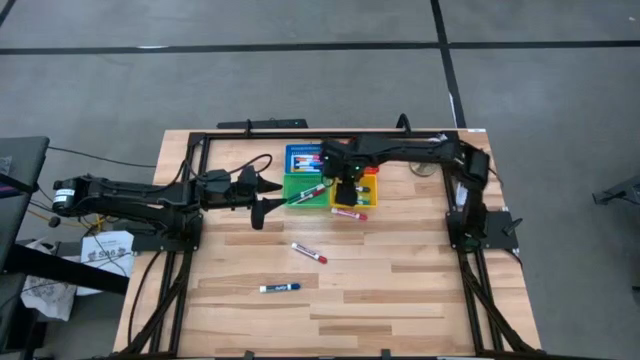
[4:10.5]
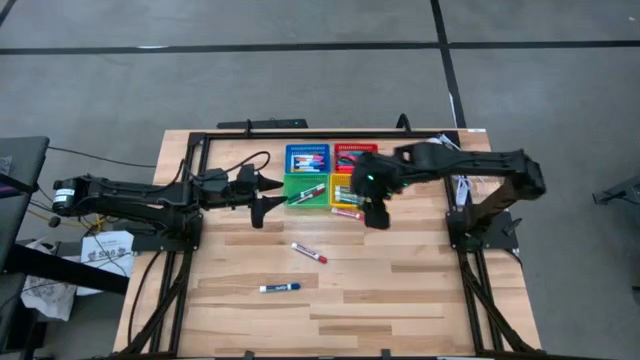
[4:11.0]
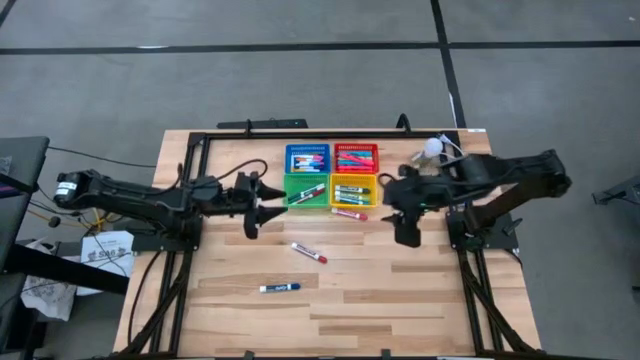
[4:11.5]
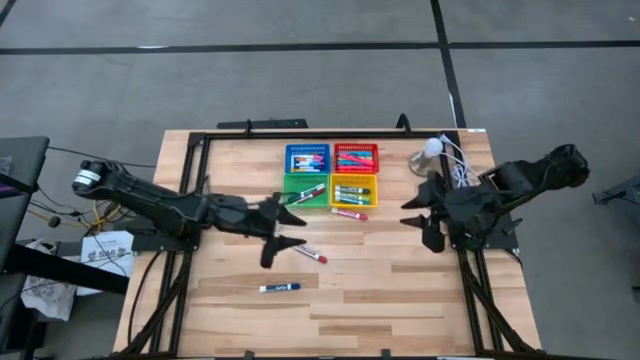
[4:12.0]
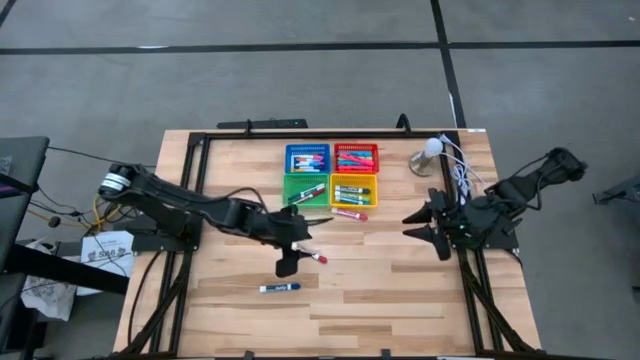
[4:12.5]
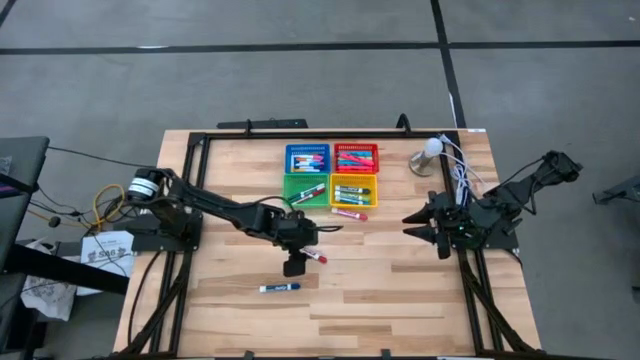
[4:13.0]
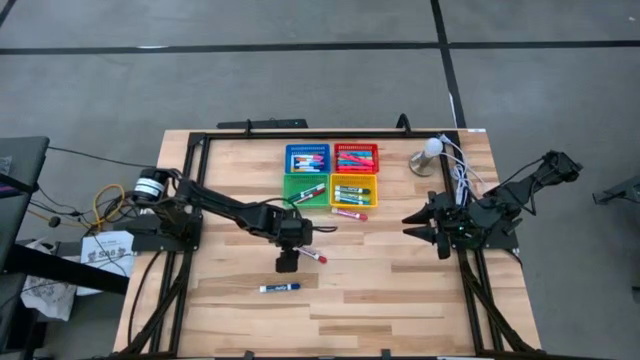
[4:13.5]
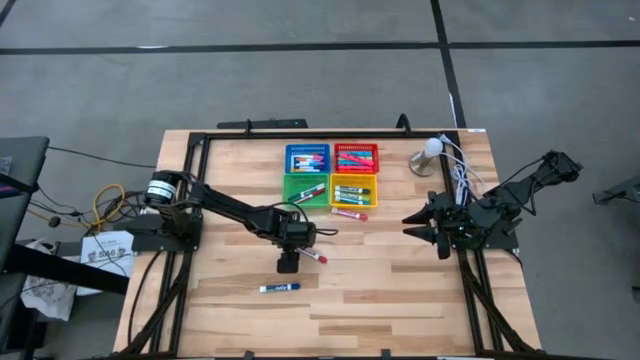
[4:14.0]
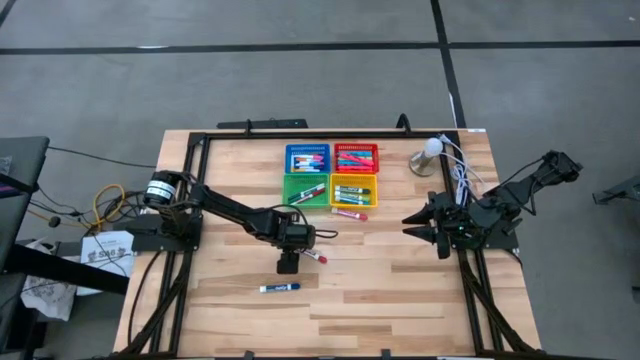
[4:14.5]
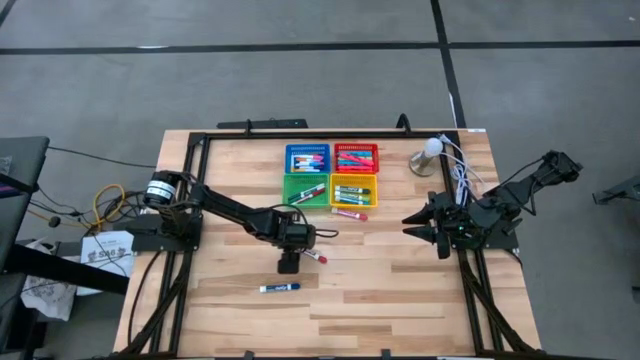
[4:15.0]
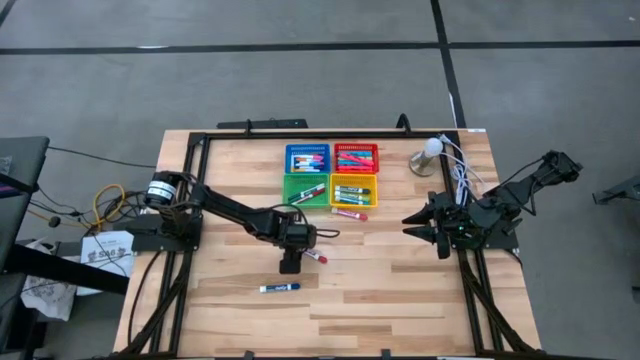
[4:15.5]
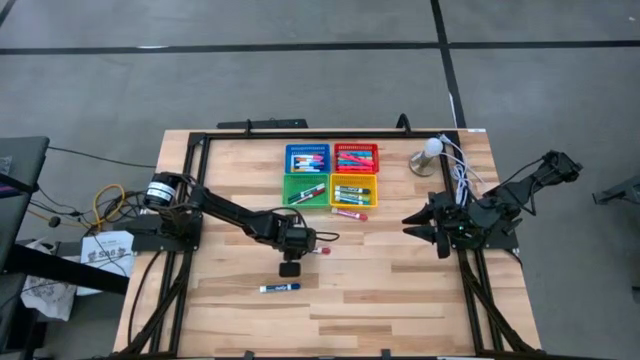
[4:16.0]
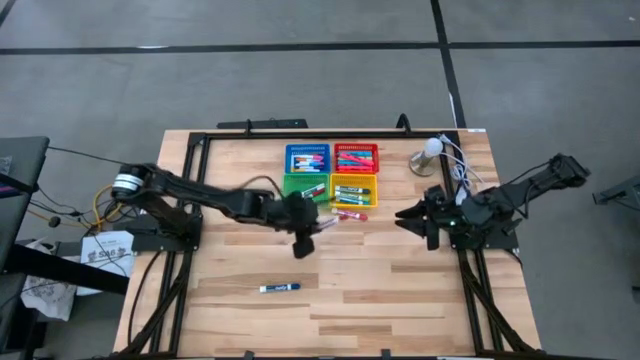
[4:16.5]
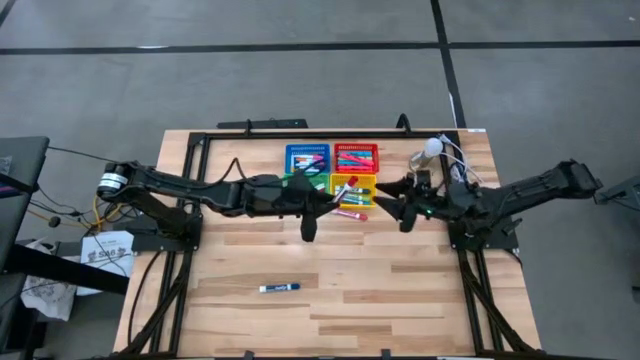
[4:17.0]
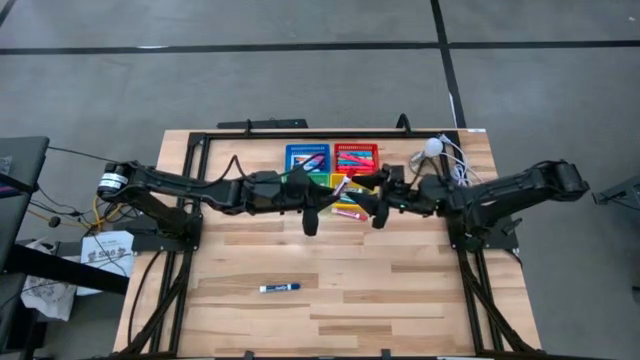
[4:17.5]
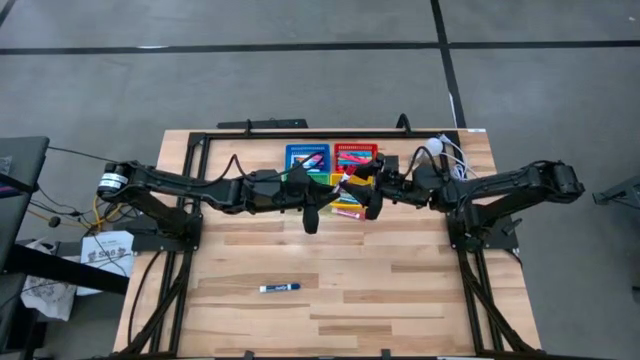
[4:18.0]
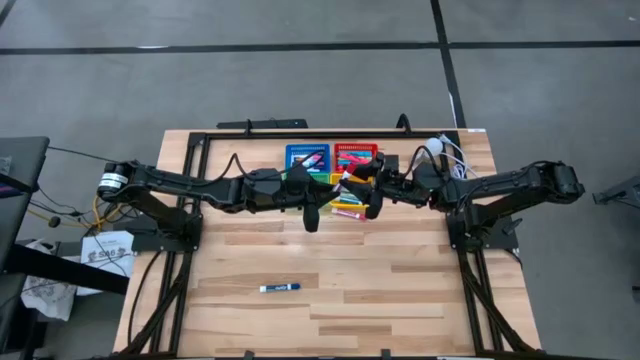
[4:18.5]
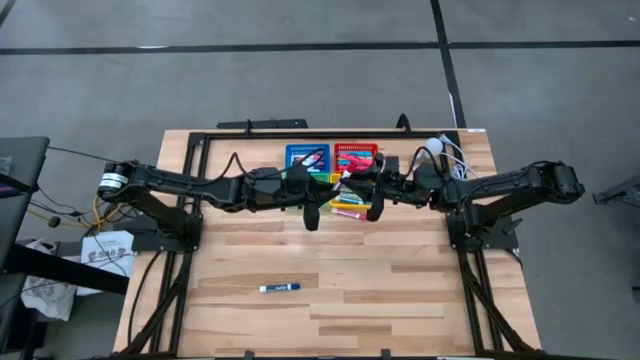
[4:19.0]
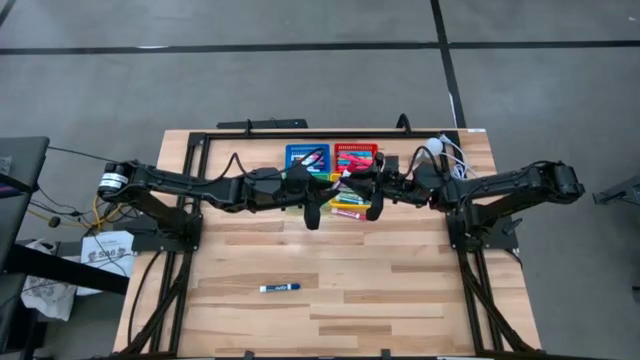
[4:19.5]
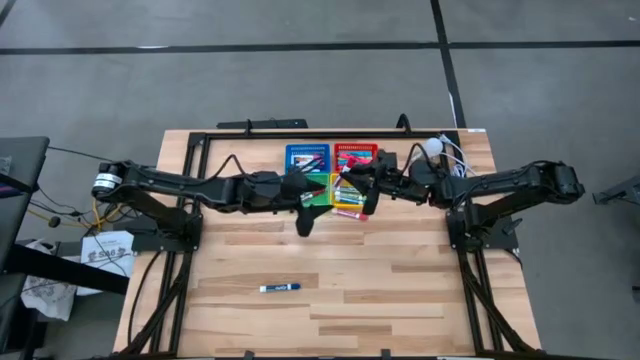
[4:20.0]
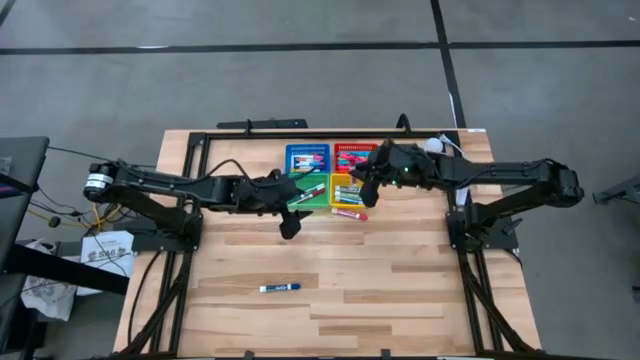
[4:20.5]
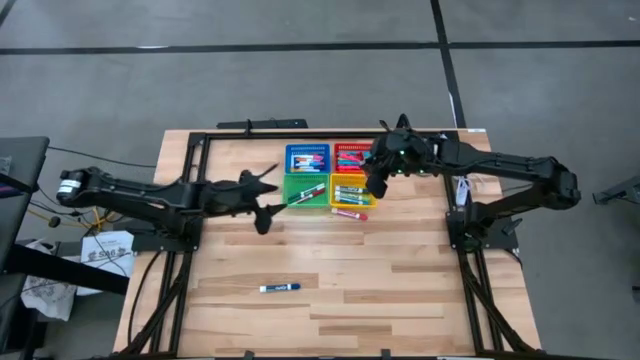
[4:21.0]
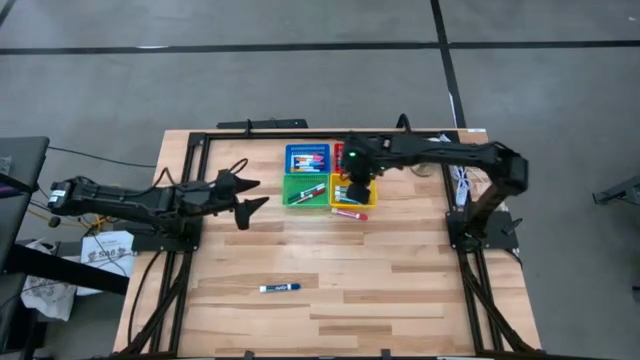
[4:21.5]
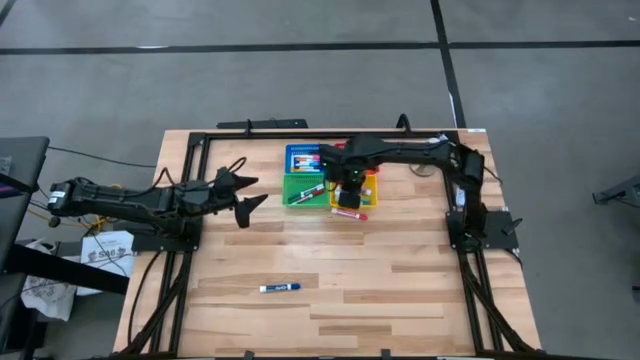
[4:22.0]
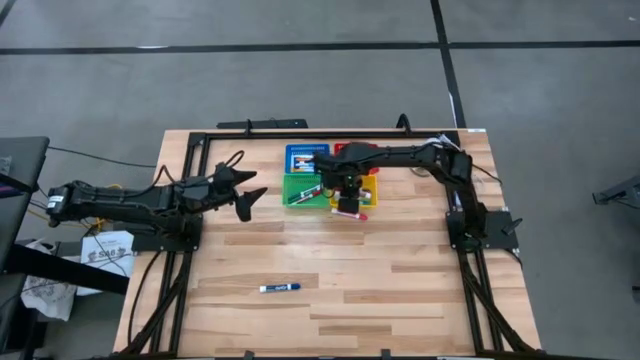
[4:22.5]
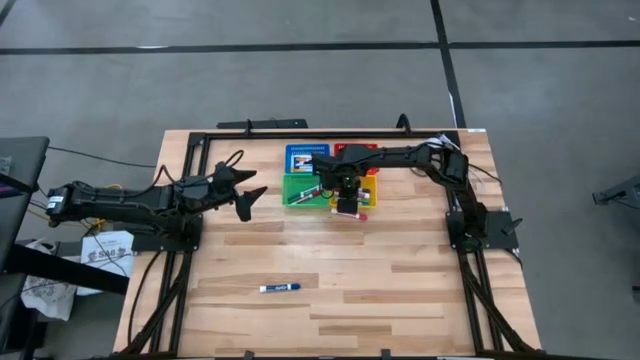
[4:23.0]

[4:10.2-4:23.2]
Task: Pick & Place Markers
Put the large red marker into the yellow bin

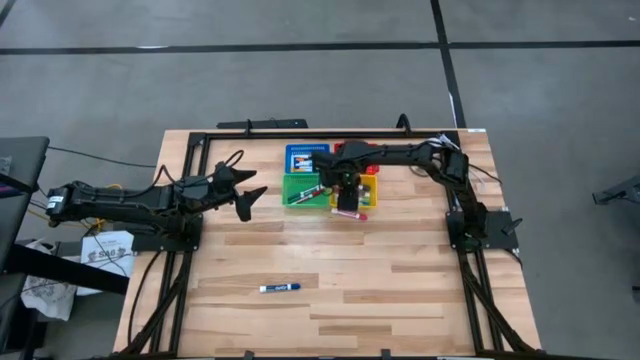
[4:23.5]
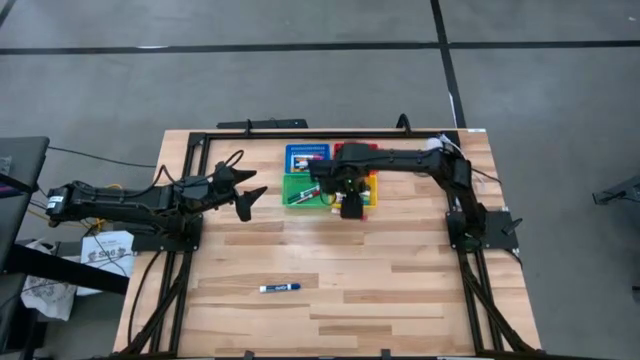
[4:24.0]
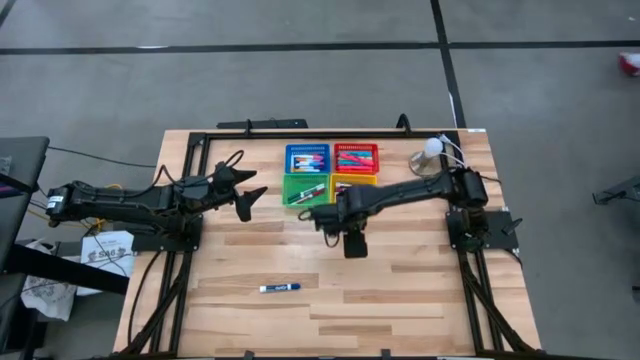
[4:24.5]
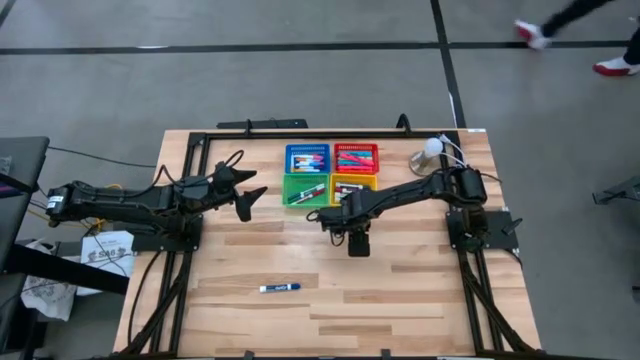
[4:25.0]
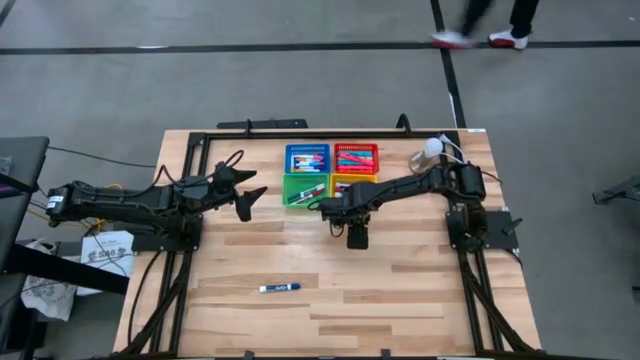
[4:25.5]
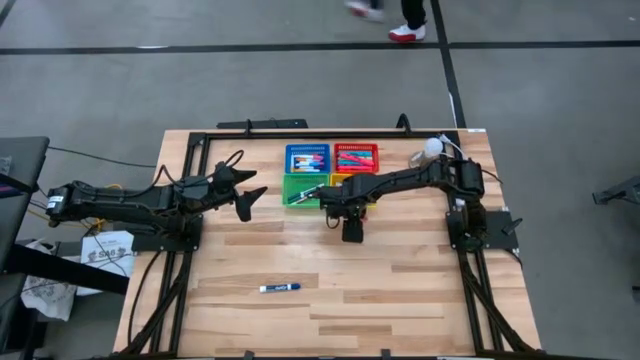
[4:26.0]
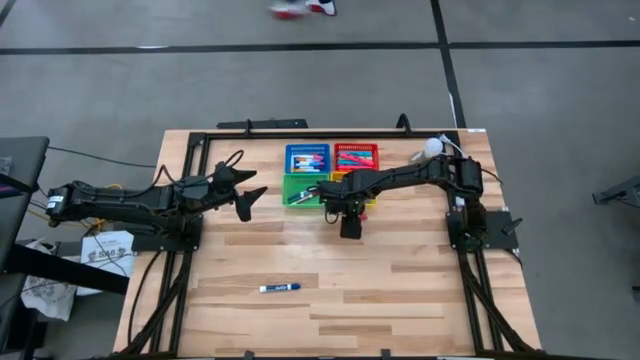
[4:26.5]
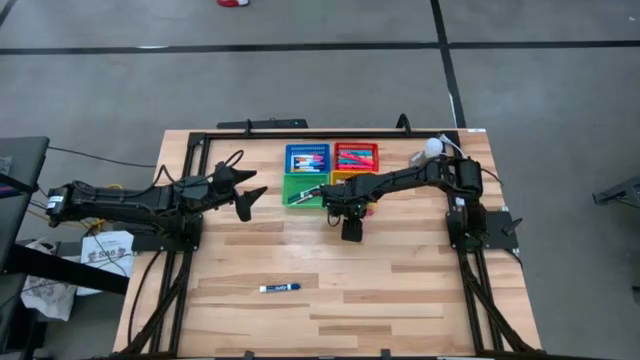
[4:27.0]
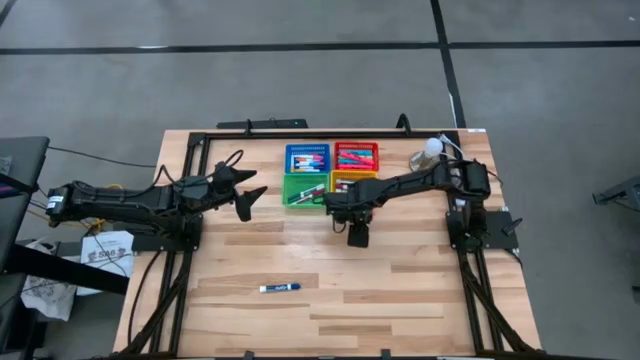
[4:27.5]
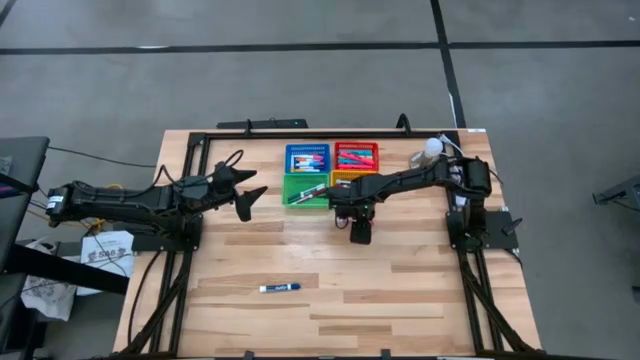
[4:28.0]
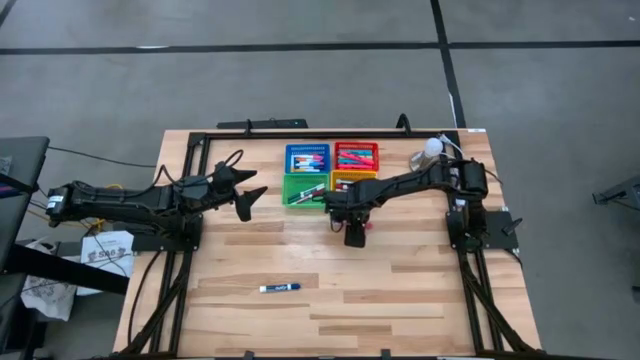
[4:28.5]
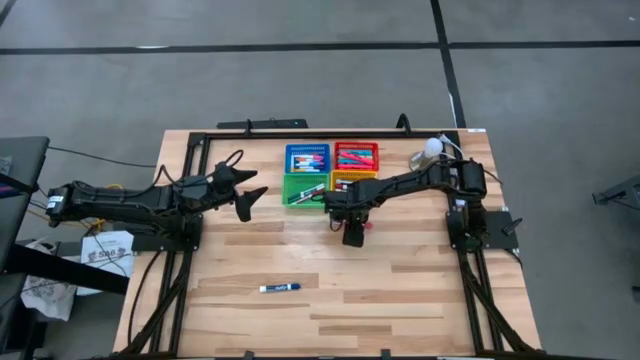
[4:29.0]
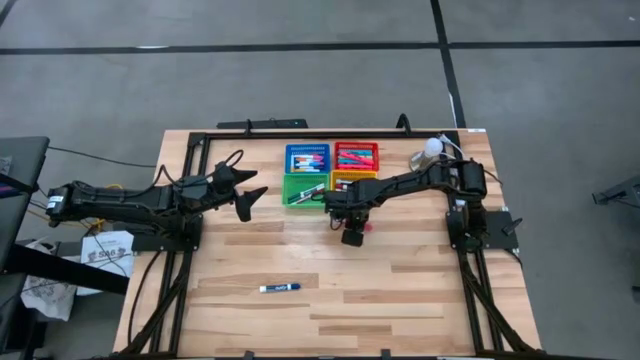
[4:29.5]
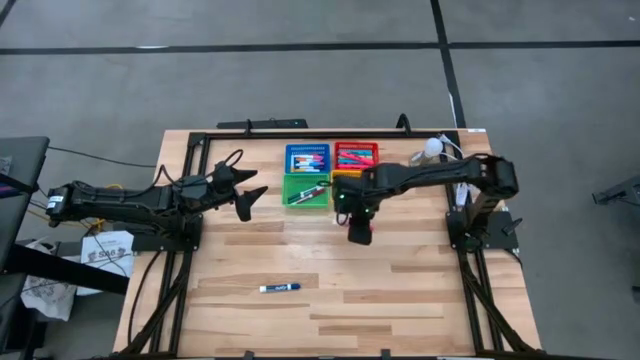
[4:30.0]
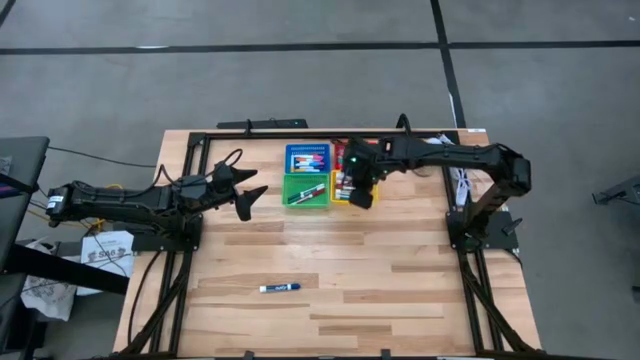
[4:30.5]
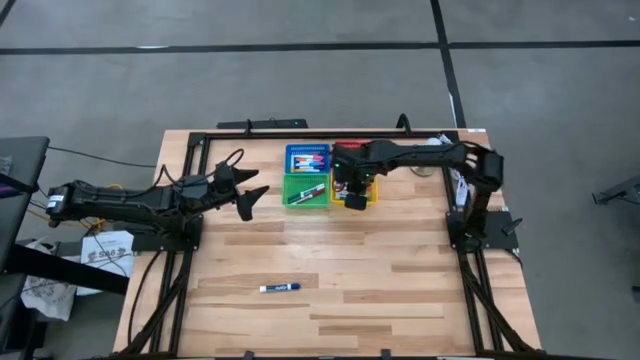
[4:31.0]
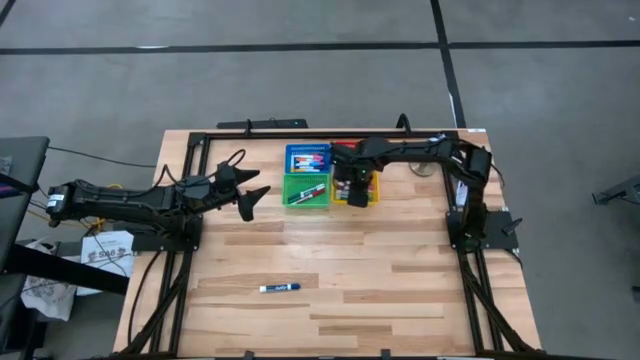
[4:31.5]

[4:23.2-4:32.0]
Put the large pink marker into the yellow bin
